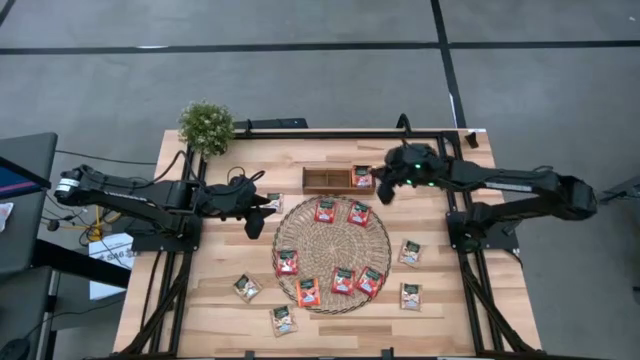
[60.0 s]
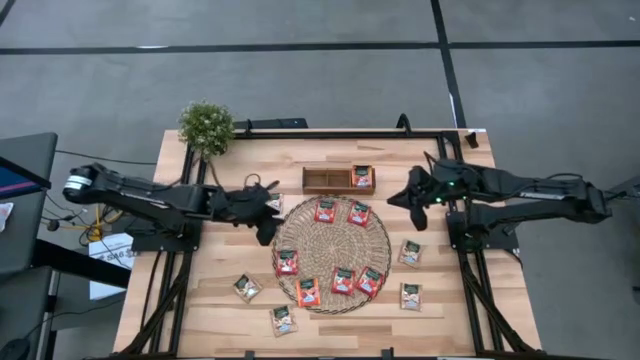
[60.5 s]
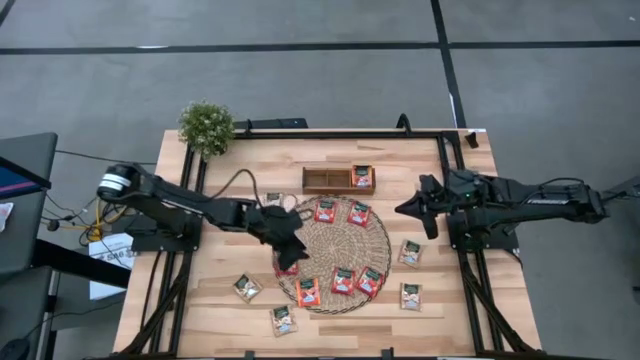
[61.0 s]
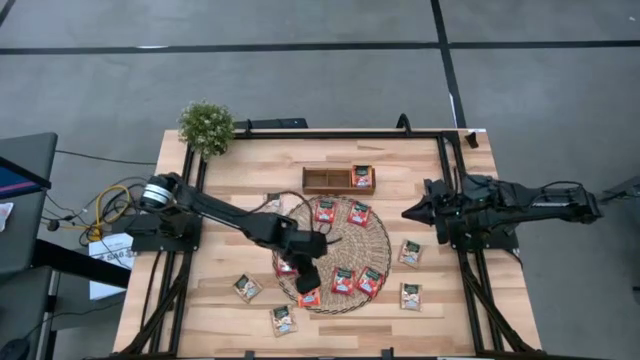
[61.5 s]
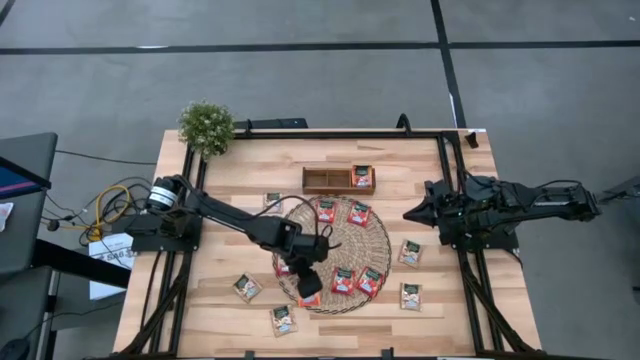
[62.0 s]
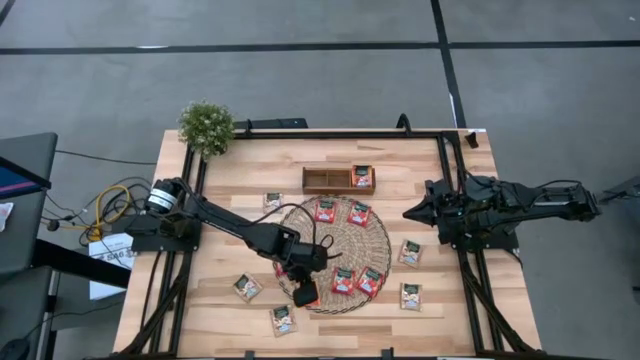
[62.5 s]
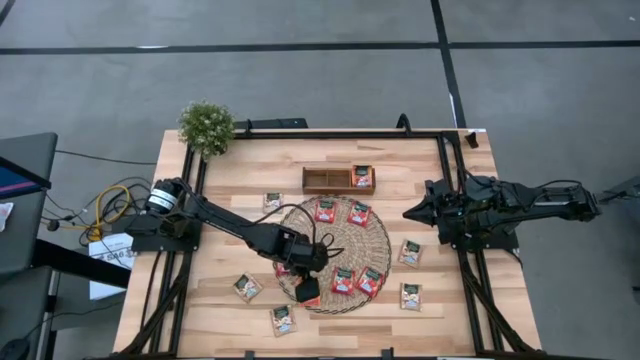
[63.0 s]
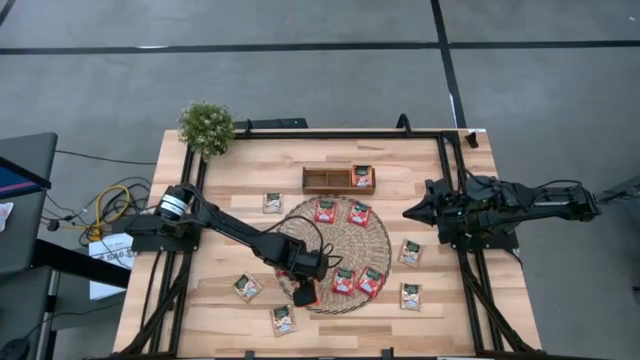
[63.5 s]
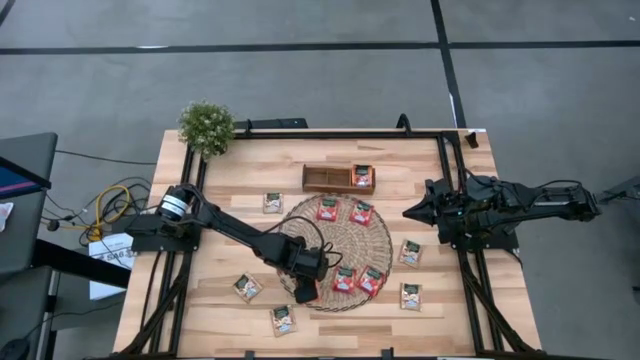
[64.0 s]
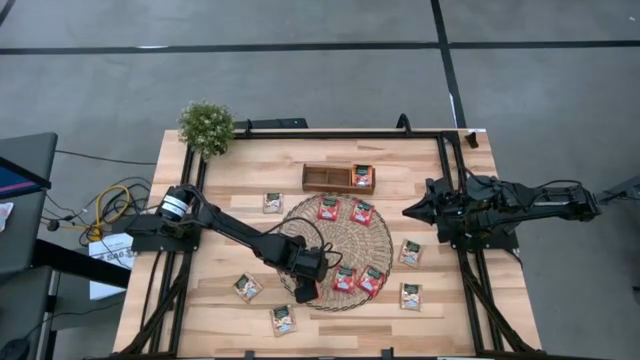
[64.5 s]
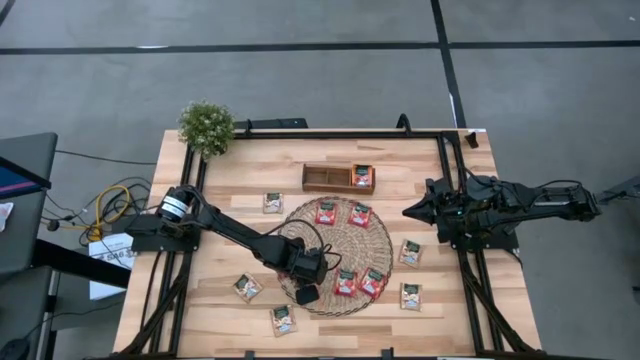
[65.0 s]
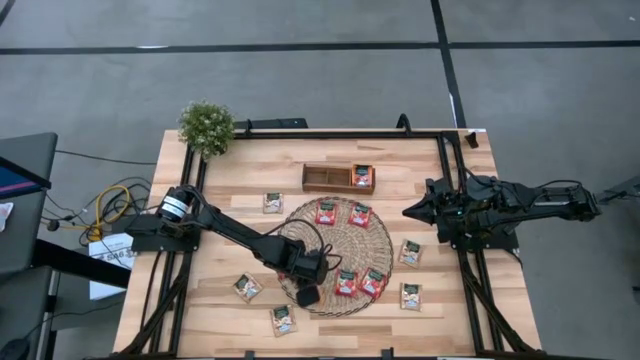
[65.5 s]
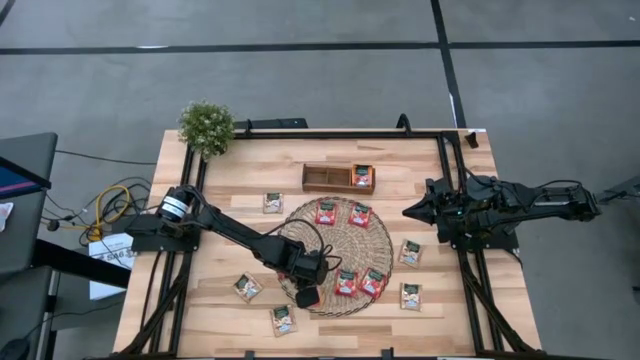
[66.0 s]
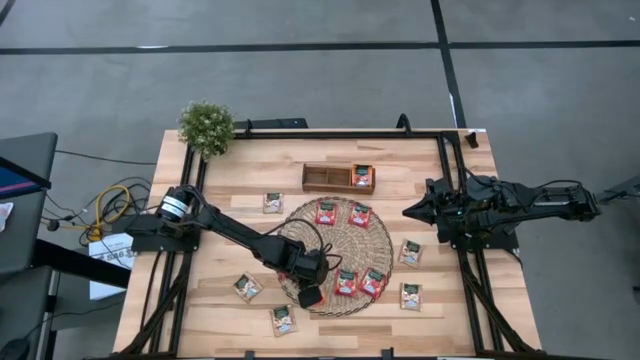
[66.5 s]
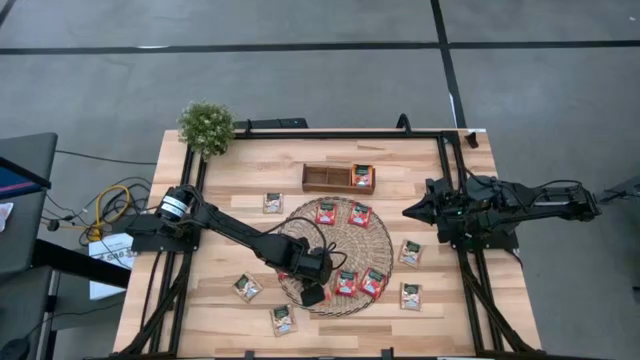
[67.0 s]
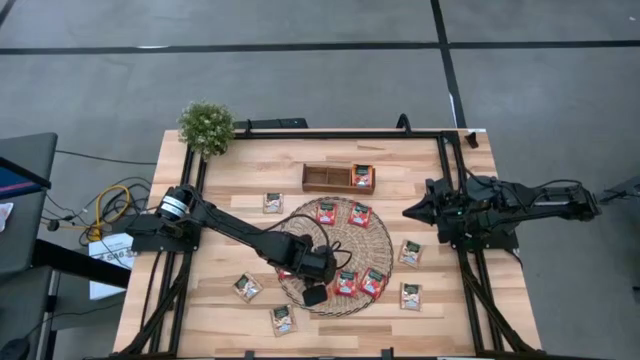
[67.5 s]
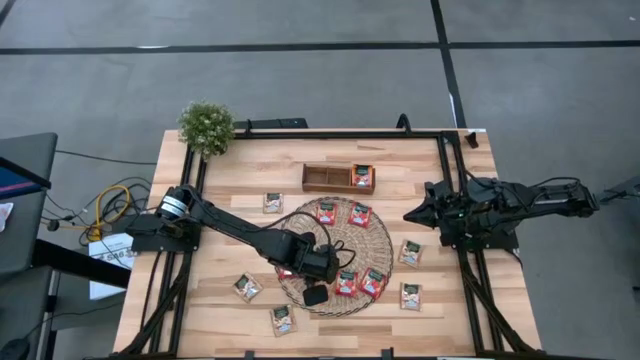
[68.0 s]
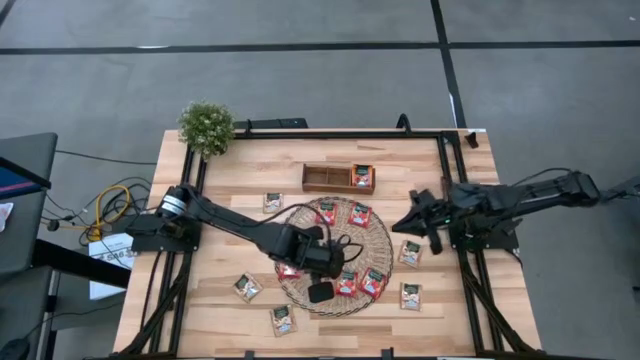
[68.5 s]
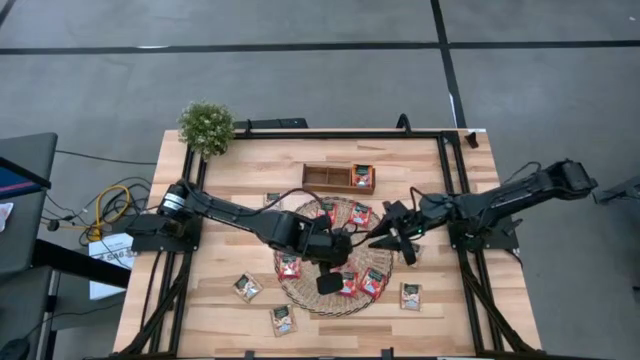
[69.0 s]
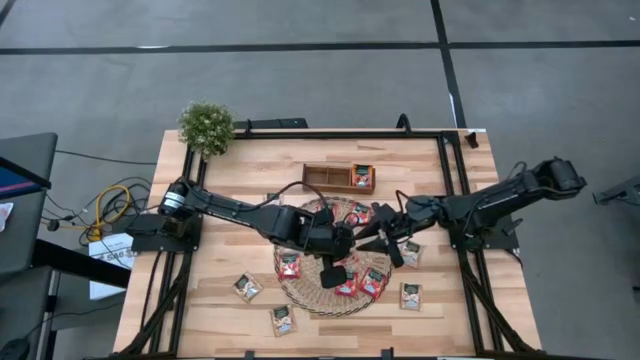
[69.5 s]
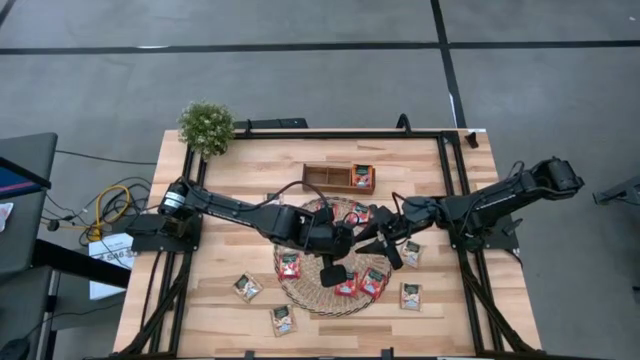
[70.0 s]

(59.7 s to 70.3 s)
Task: Pick & Place Tea
Put the orange tea bag into the right section of the wooden organizer

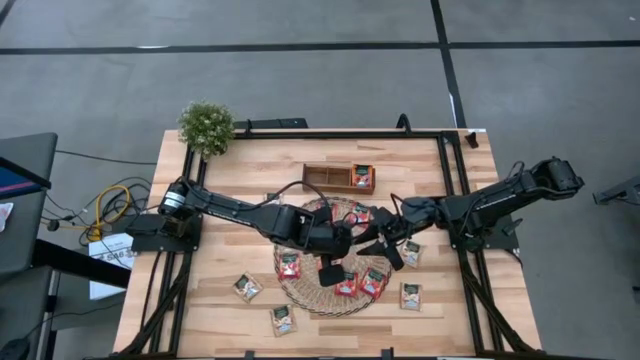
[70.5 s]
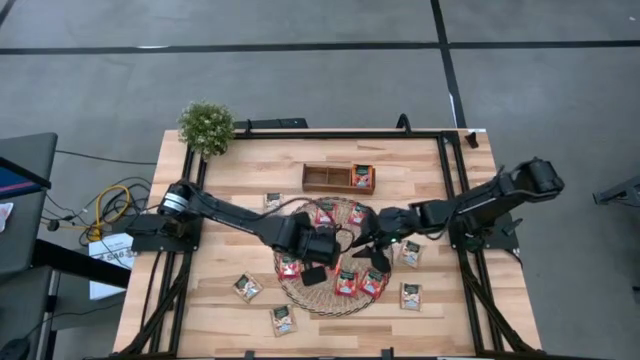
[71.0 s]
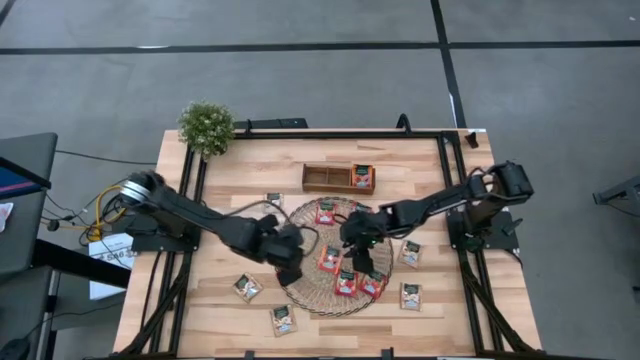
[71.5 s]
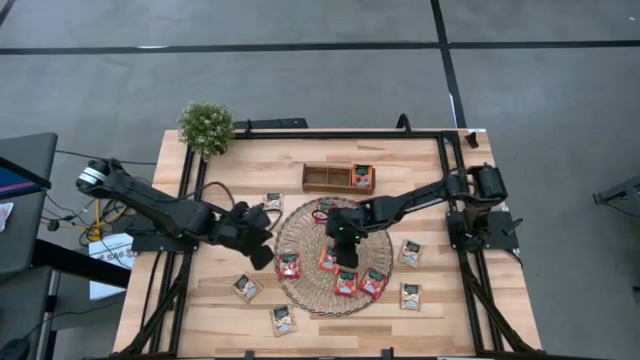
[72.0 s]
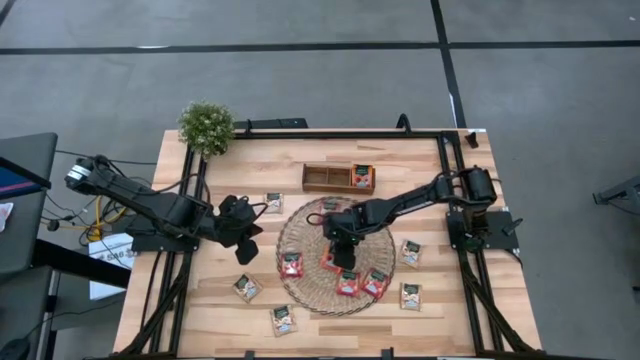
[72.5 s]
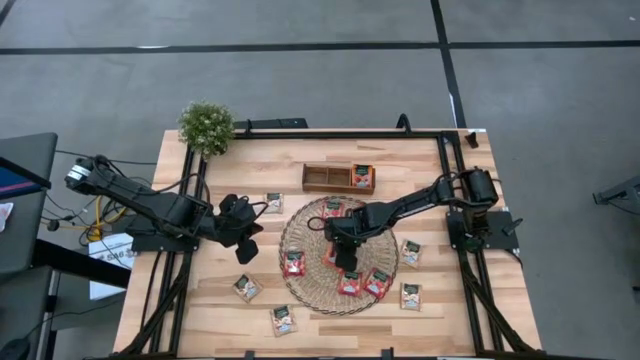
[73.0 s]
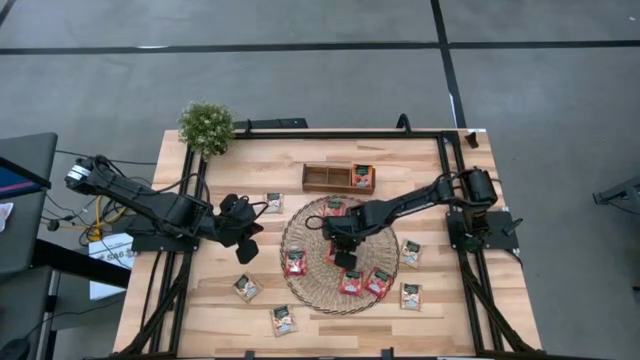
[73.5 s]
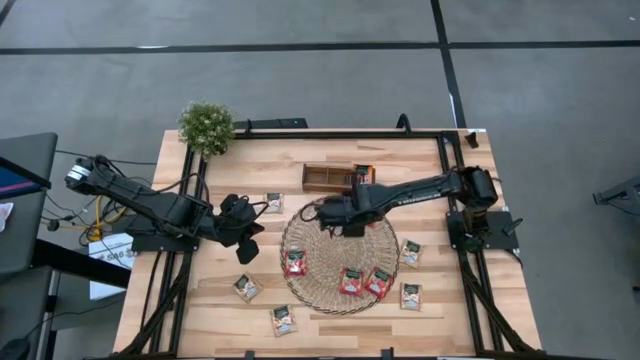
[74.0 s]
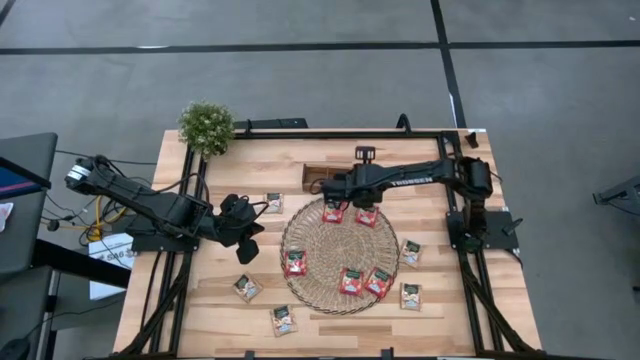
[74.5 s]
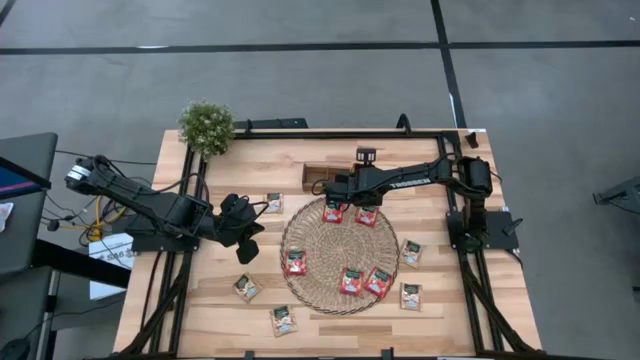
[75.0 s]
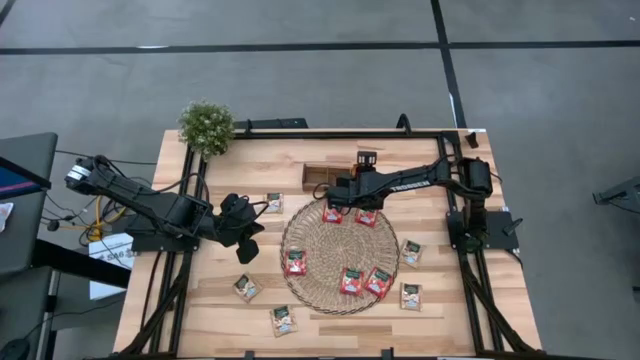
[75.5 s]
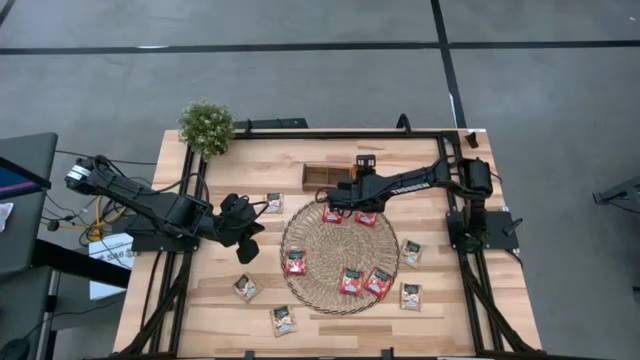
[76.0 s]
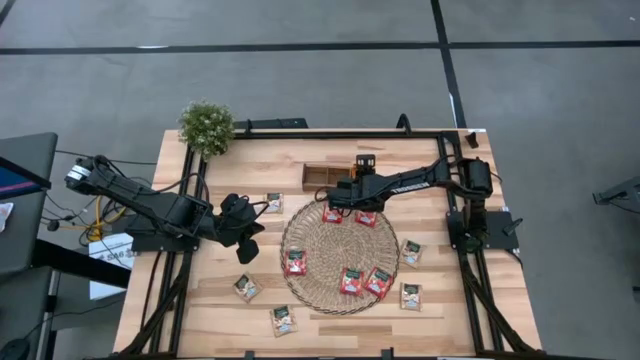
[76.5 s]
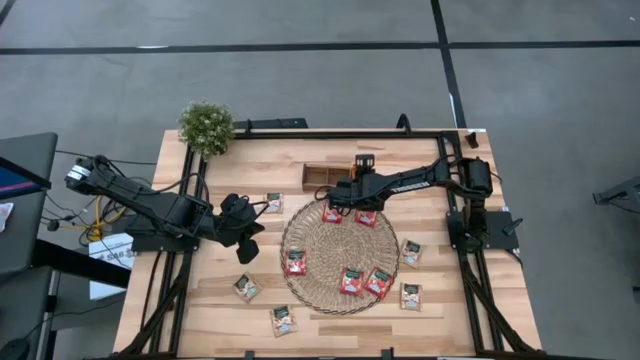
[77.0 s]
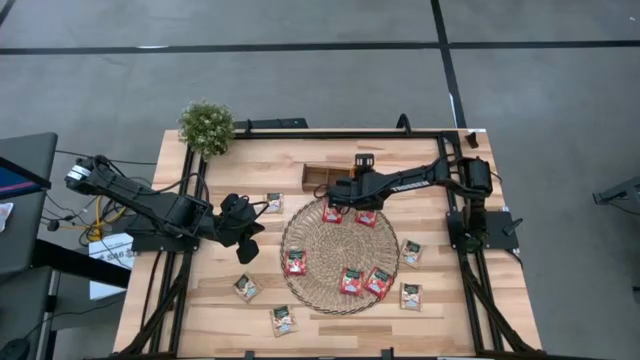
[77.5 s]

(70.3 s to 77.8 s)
Put the orange tea bag into the right section of the wooden organizer

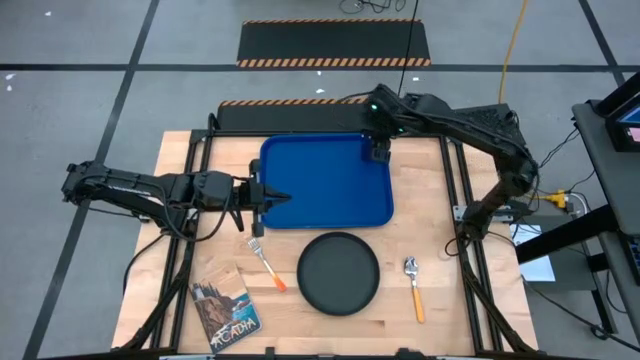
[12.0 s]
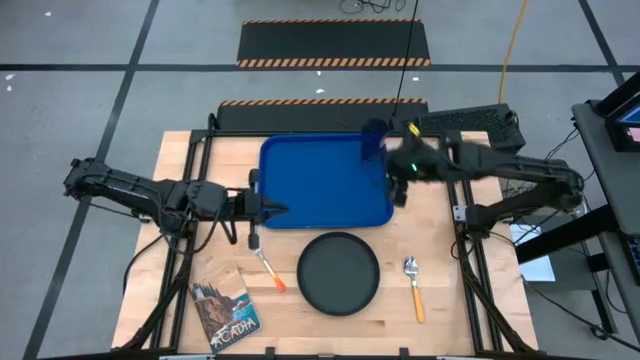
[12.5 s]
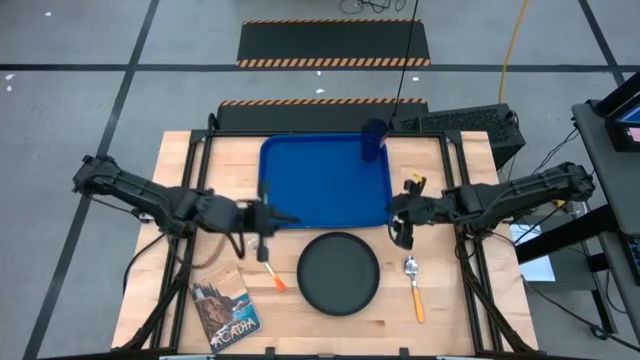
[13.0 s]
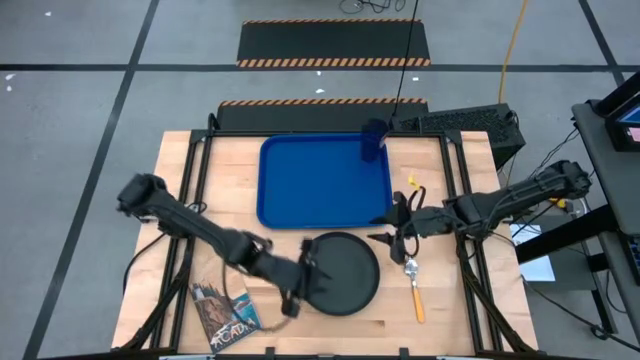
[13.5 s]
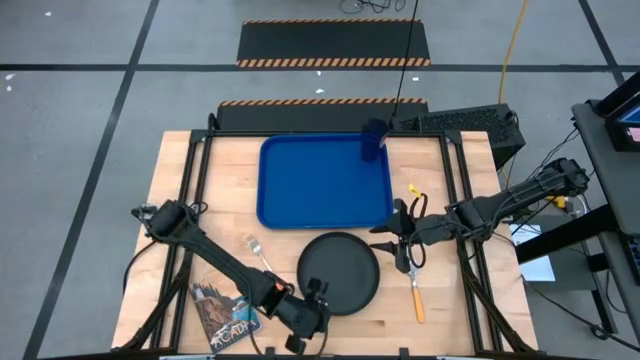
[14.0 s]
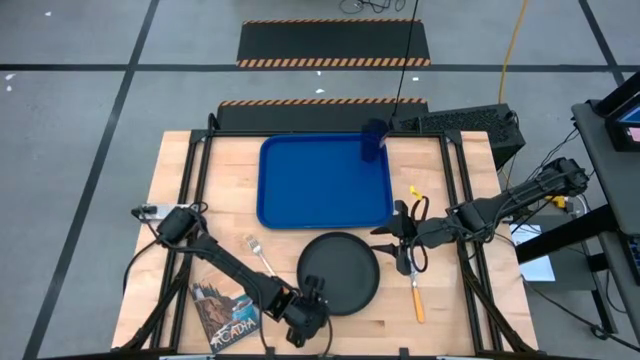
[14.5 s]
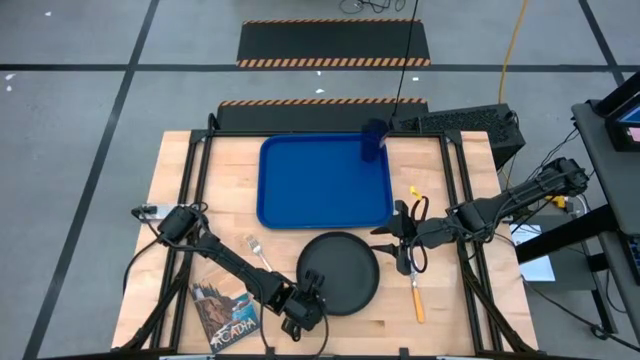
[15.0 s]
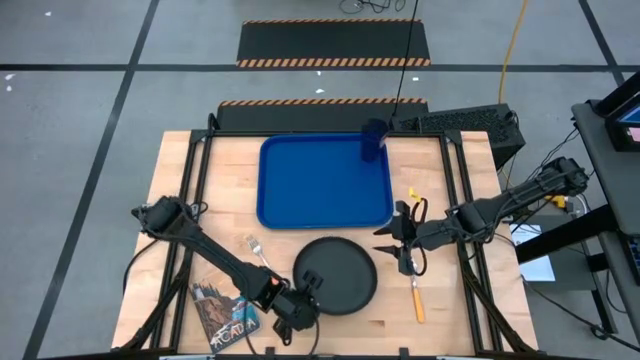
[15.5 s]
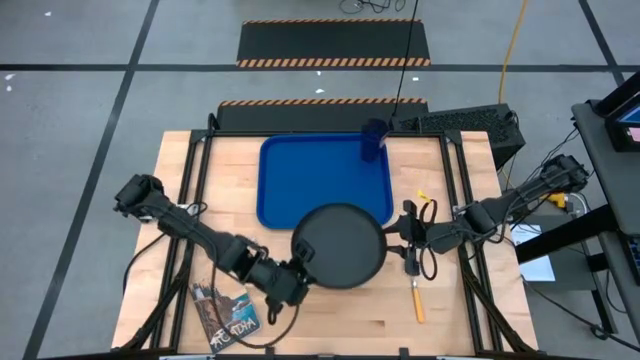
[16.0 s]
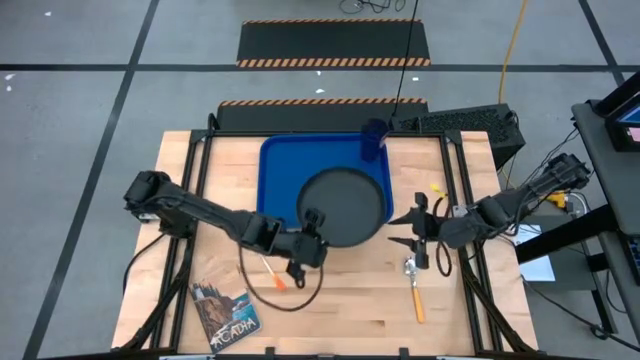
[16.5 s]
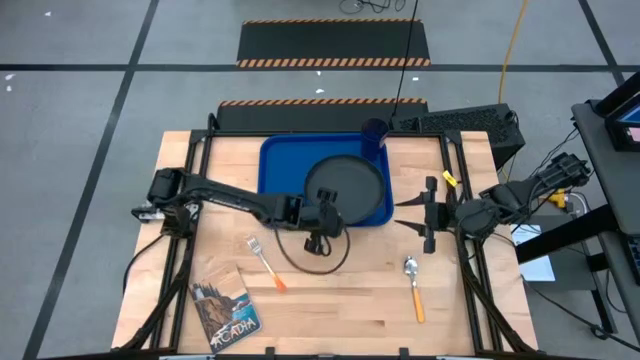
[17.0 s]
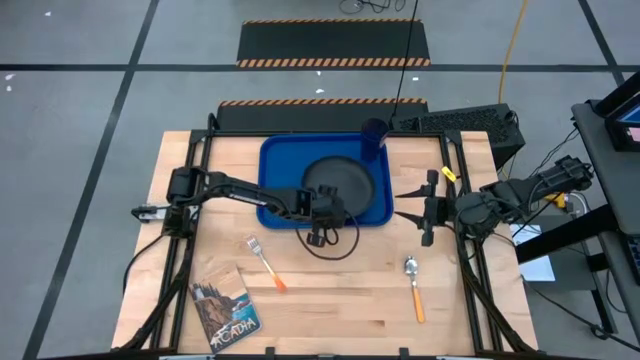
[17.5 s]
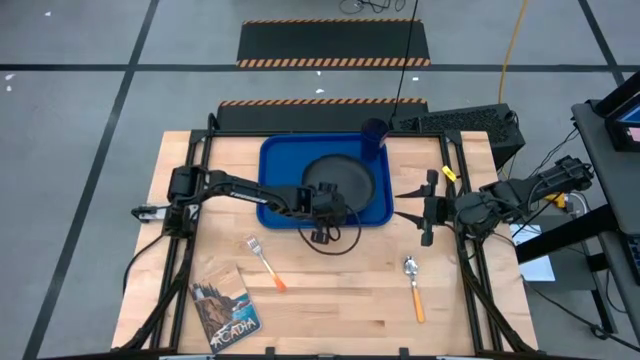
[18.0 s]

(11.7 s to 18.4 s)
Task: Pick and place plate/cup/fork/spoon on tray
Put the black plate on the blue serving tray to the bottom of the violet cup
